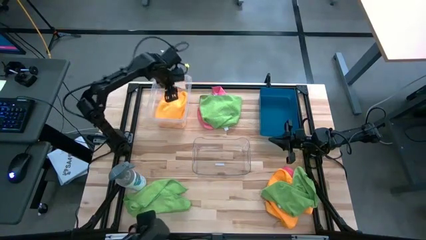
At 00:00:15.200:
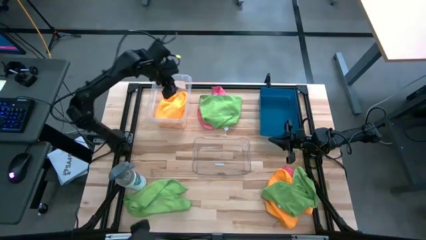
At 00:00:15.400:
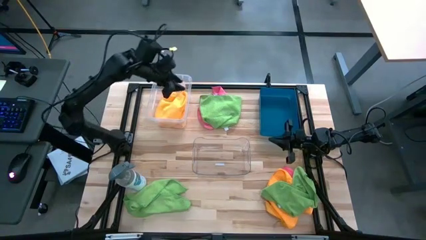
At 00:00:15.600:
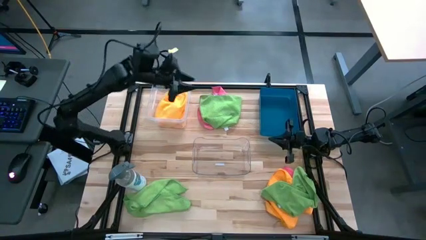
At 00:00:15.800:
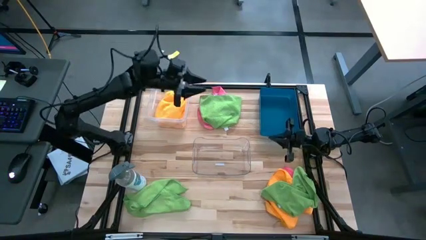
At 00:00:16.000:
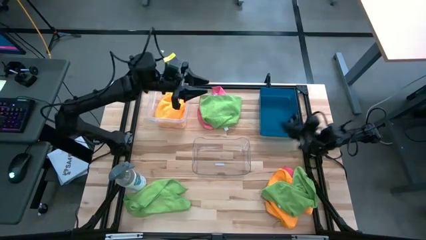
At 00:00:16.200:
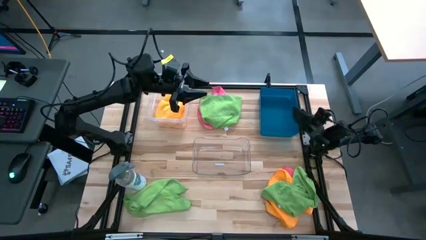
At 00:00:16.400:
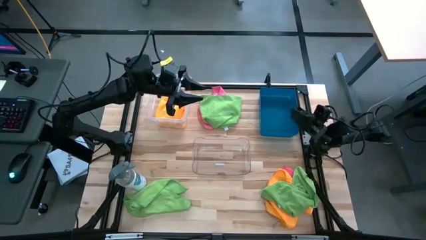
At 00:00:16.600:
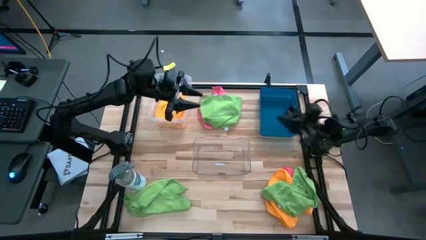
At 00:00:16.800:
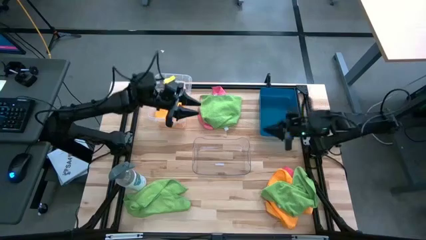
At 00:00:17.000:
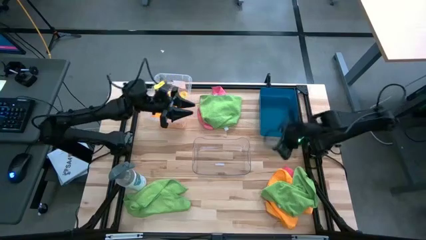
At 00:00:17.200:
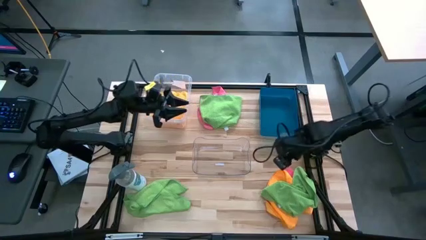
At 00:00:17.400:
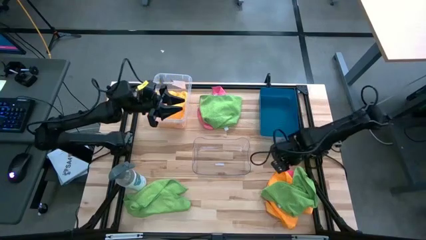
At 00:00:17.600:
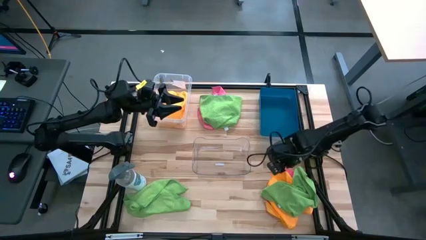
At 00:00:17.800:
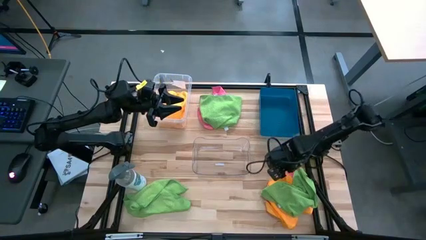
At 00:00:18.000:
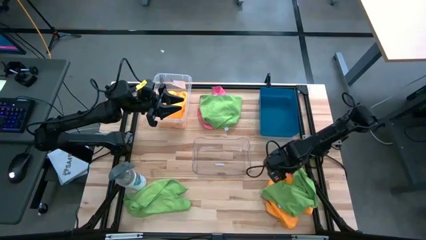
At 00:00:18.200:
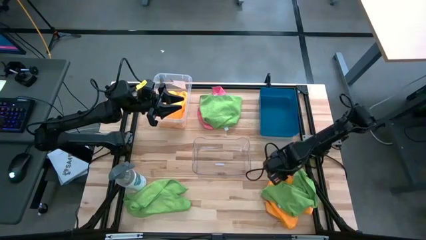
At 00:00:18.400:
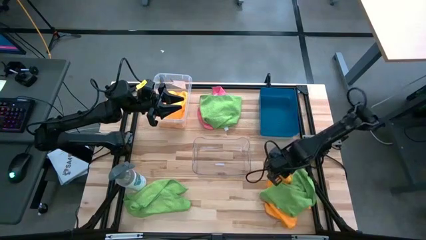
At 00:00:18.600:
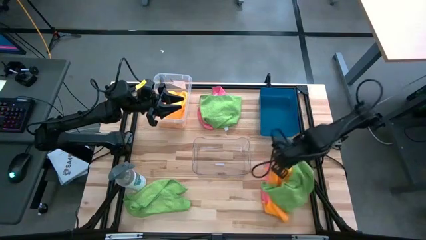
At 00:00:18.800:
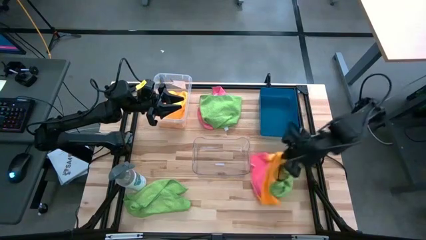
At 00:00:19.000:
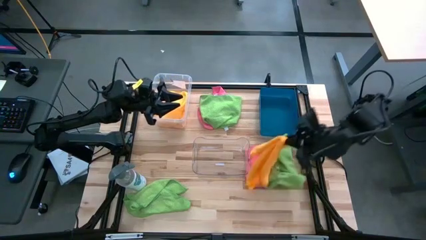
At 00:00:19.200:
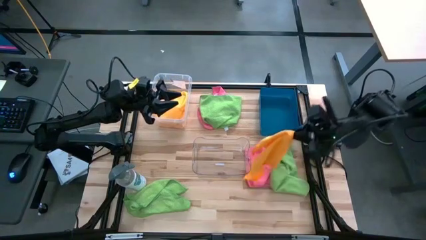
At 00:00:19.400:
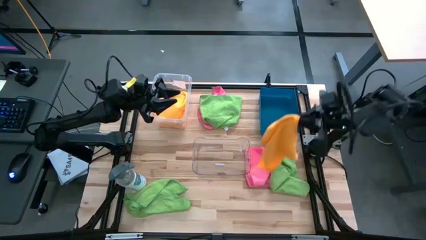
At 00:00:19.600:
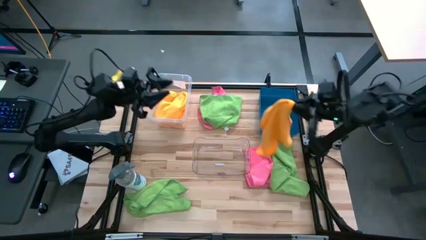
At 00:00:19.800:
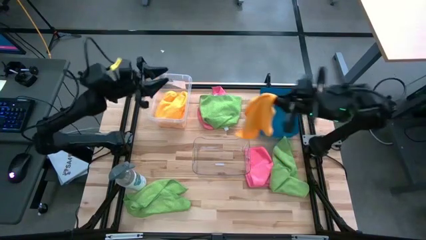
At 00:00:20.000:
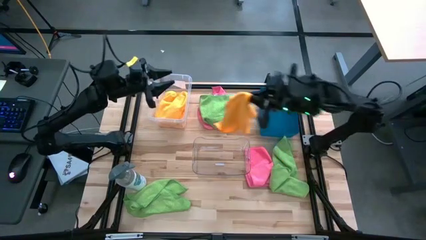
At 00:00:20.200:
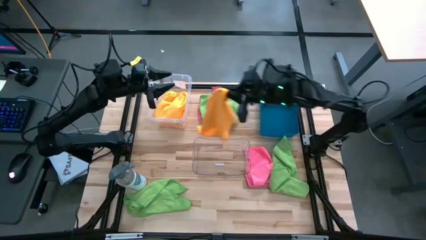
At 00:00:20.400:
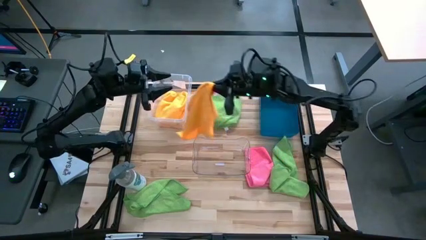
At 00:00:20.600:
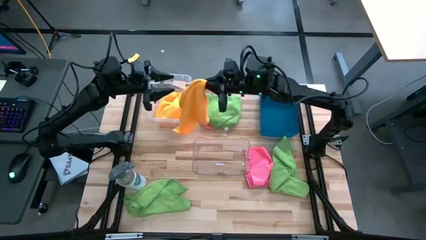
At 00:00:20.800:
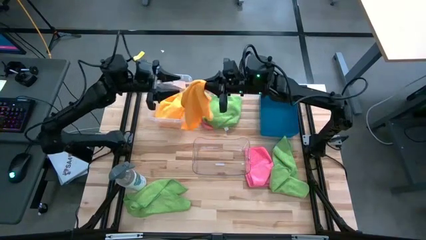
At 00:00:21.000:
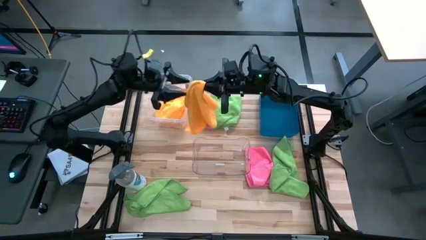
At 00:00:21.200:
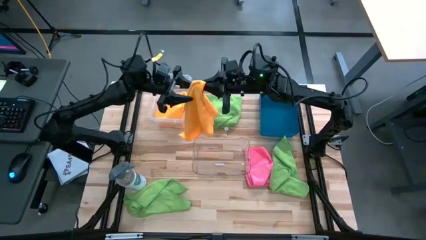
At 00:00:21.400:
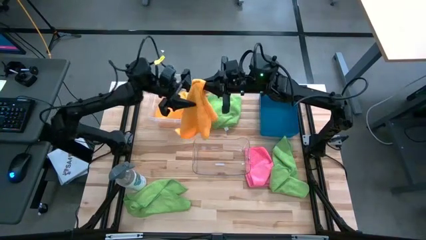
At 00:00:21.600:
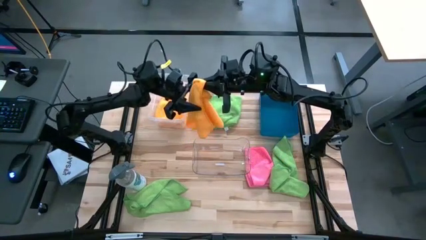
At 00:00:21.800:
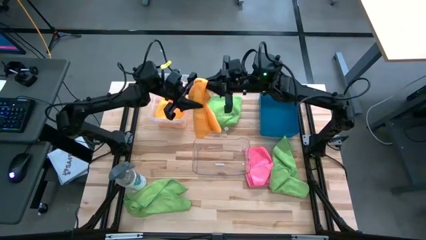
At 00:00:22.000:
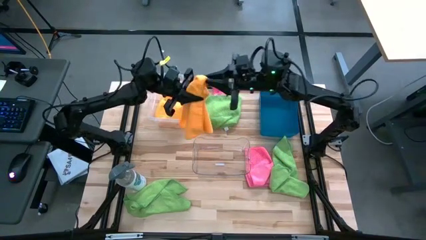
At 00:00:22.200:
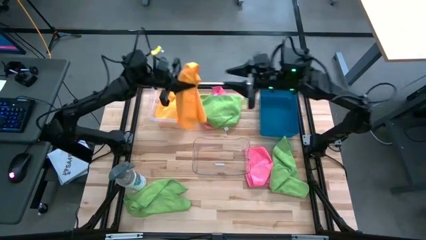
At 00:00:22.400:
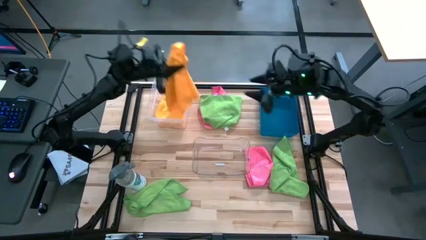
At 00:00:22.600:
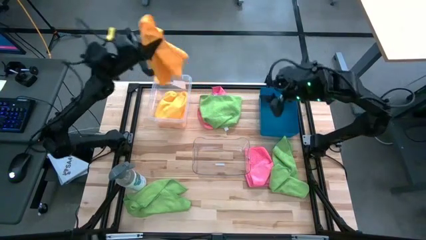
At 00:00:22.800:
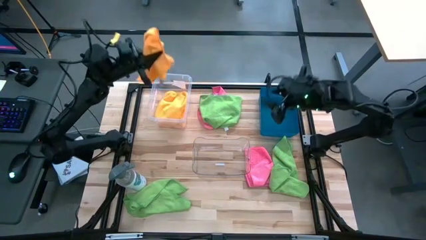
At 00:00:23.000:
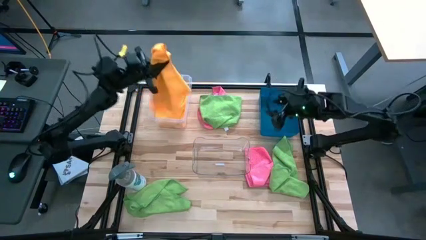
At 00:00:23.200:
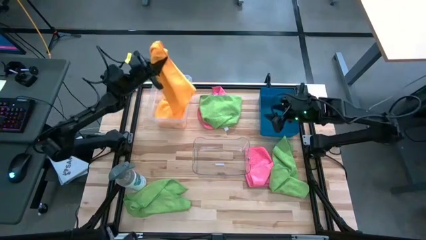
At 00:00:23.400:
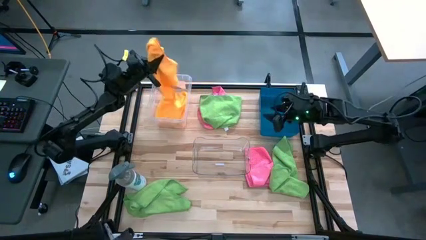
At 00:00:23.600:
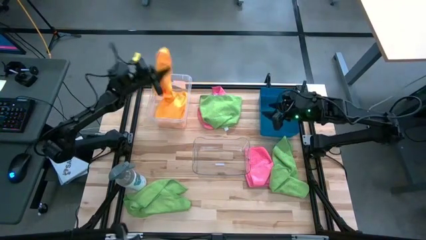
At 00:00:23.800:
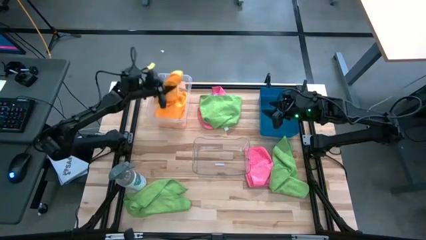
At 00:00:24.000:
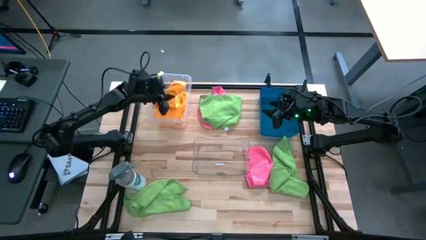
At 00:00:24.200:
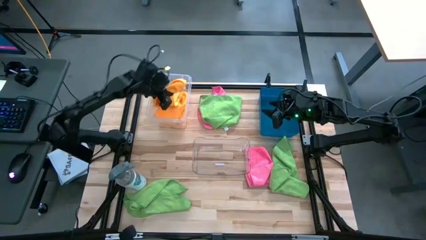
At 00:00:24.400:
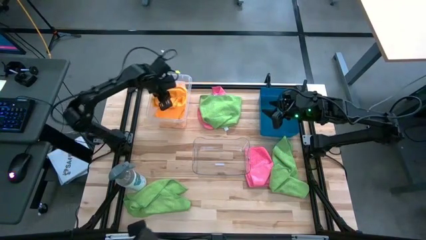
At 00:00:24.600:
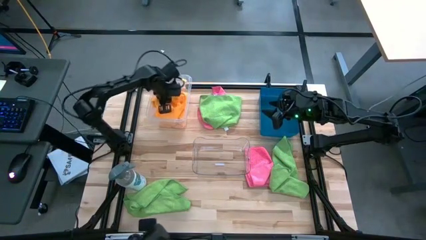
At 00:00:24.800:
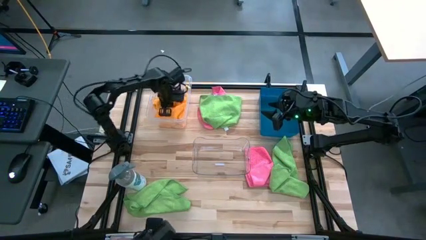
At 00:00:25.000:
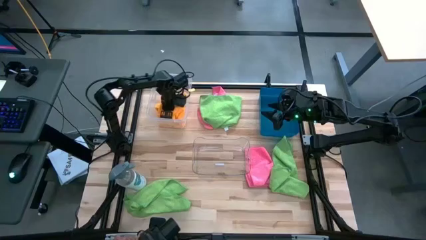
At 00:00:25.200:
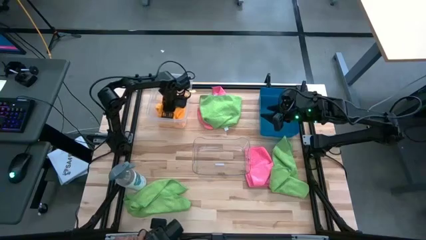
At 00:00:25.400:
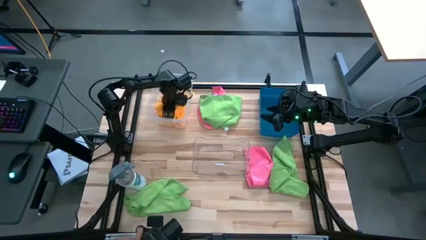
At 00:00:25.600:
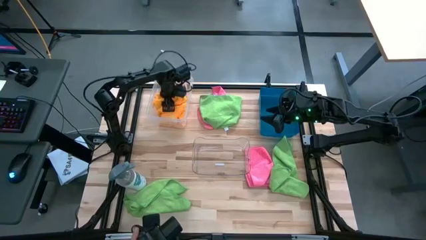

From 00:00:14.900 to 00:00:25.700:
Task: Sort microfiber towel by color & place in baskets
Put the orange microfiber cloth into the transparent bin

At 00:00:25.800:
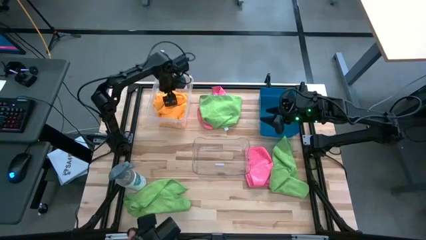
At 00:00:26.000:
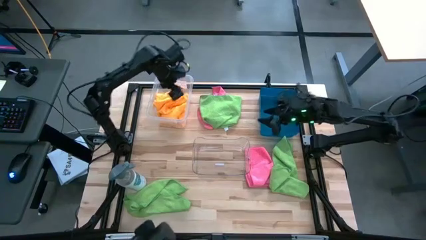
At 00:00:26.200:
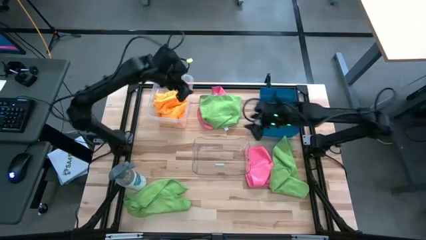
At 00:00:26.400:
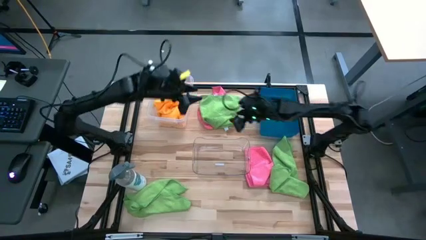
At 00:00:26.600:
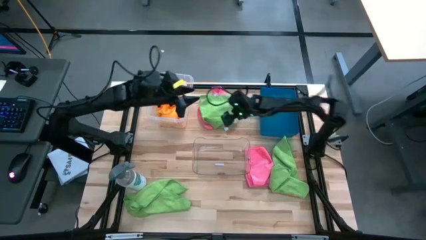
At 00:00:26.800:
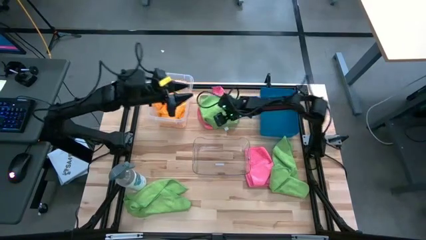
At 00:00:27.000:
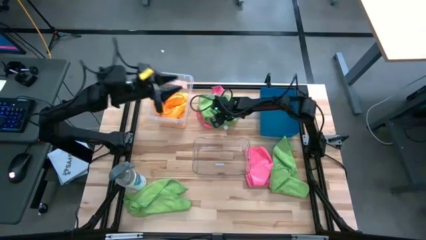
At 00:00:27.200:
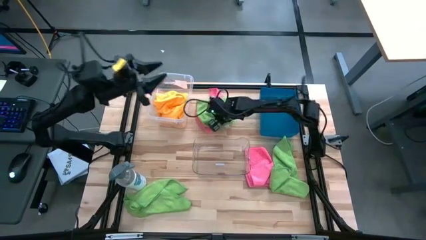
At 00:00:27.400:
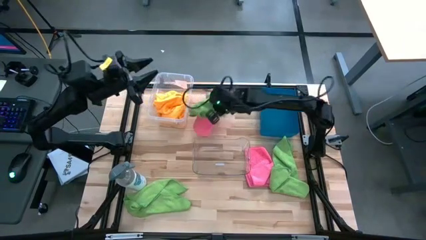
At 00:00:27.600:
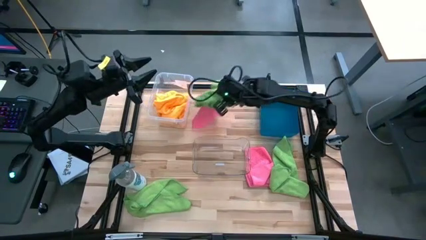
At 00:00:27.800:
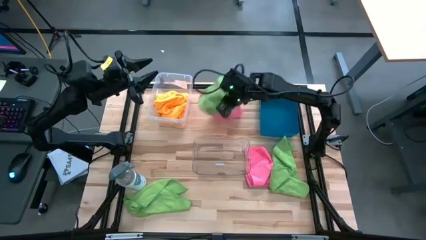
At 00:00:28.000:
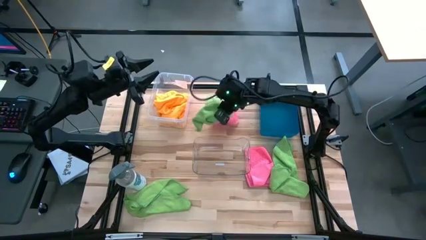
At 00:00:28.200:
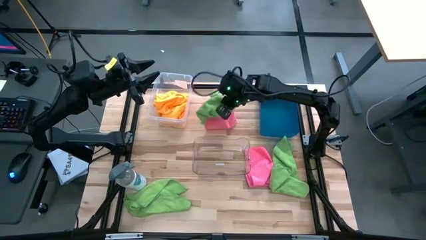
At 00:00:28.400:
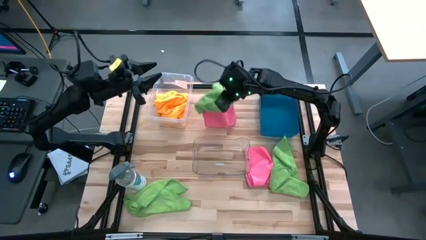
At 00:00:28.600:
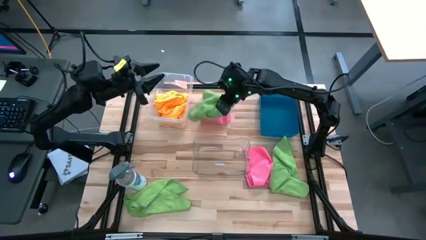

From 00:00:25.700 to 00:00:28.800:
Put the top center green microfiber cloth into the blue bin

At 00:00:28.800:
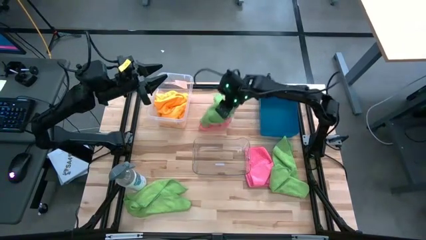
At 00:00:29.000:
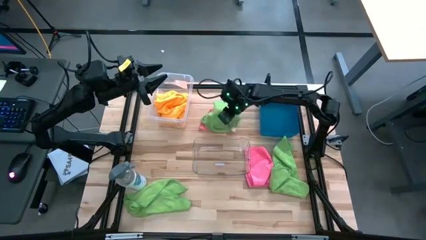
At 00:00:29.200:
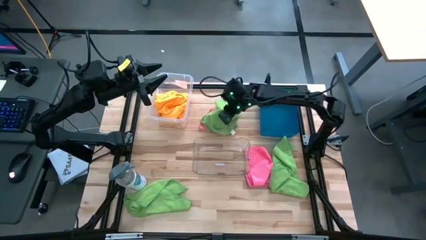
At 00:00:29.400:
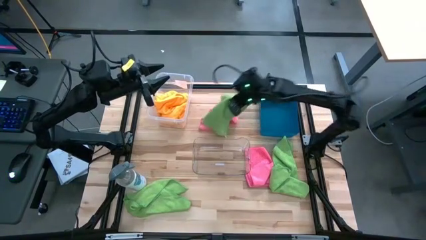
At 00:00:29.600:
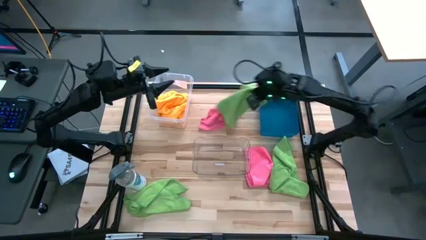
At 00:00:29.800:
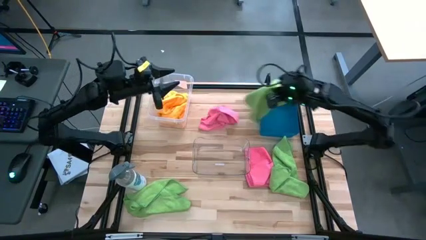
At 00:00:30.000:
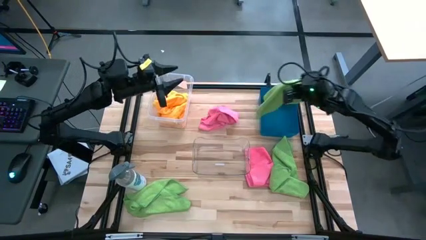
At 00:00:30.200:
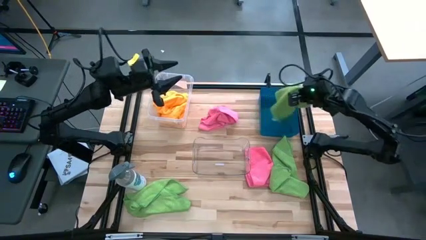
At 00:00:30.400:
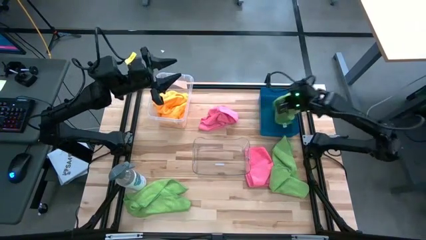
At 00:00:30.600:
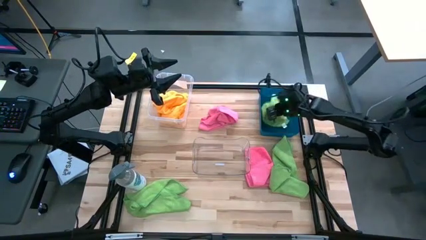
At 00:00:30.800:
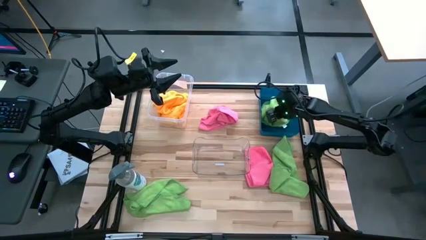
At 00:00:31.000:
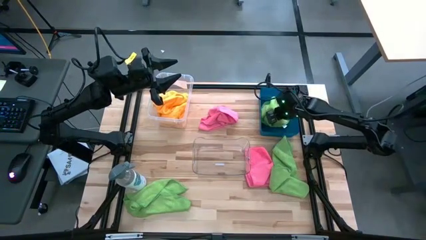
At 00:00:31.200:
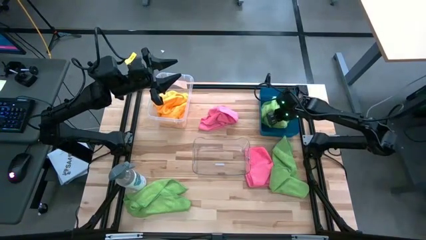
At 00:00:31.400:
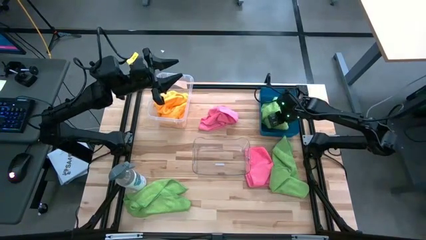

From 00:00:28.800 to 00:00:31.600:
Put the top center green microfiber cloth into the blue bin
